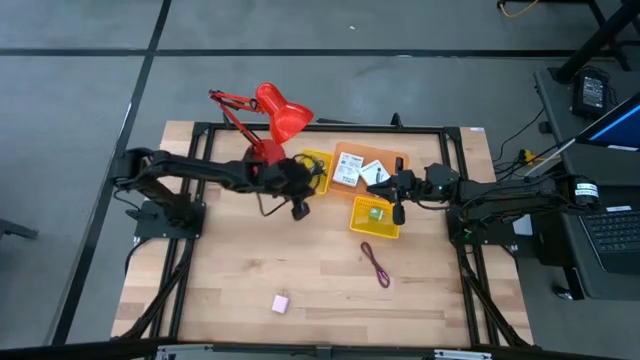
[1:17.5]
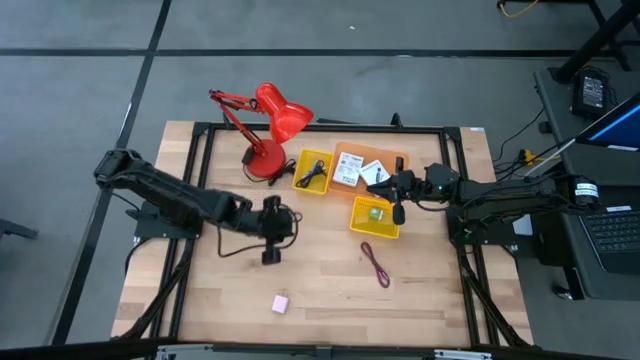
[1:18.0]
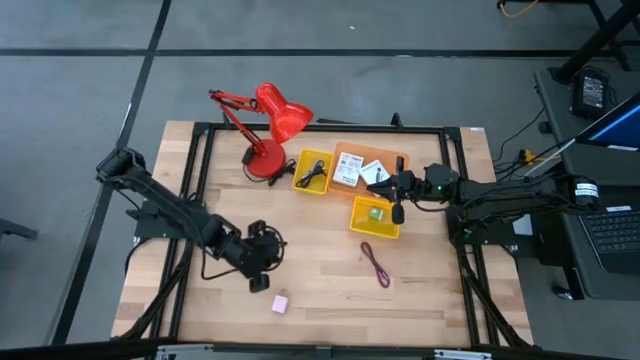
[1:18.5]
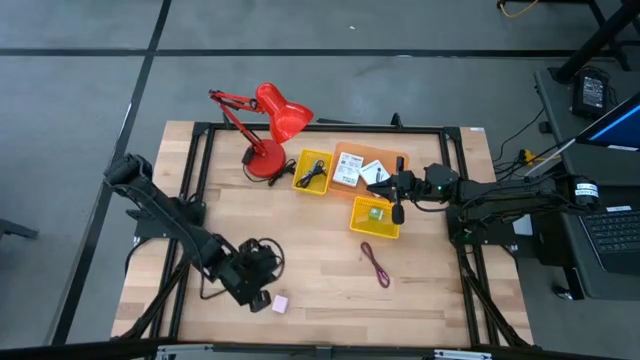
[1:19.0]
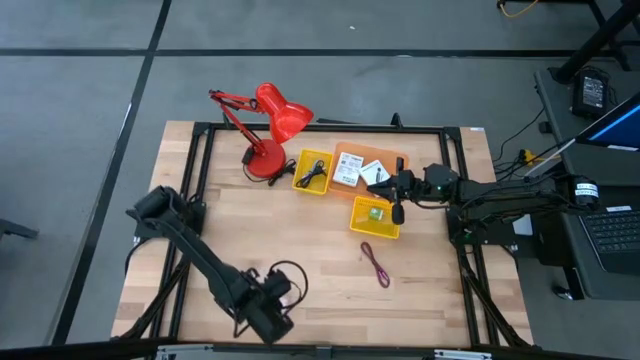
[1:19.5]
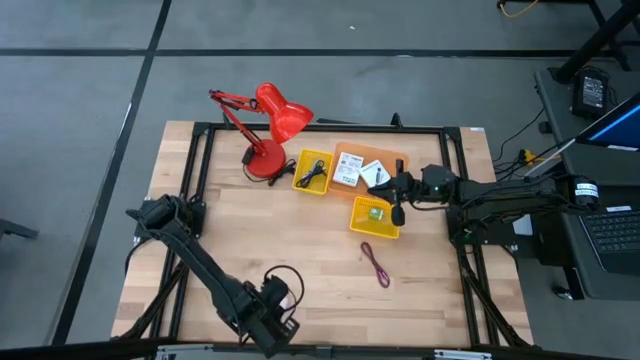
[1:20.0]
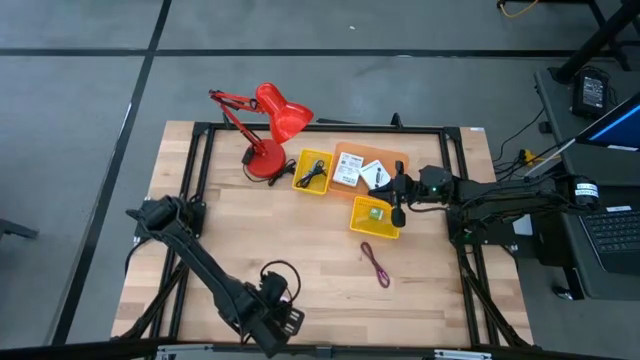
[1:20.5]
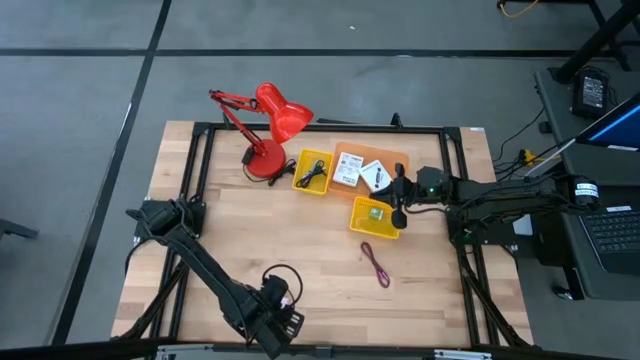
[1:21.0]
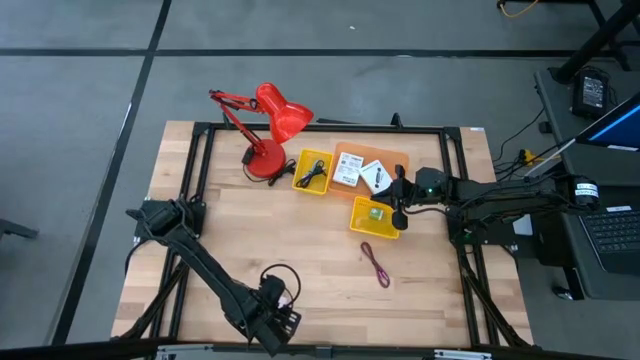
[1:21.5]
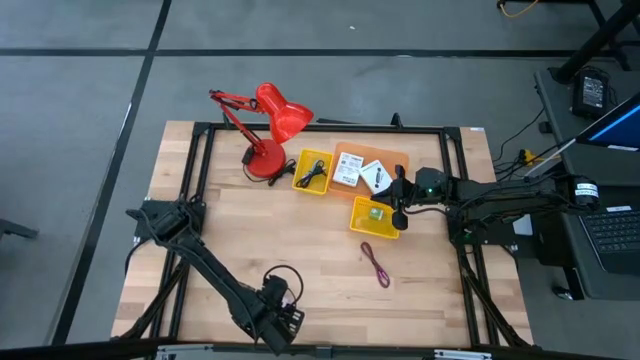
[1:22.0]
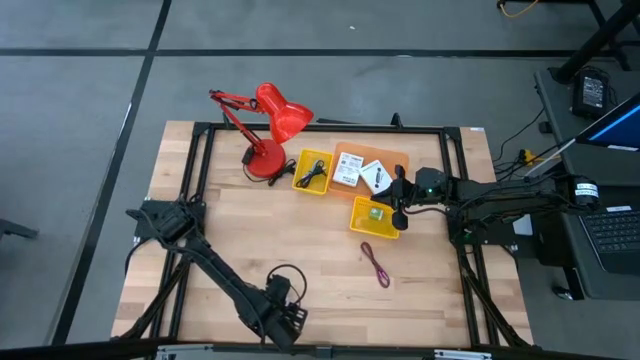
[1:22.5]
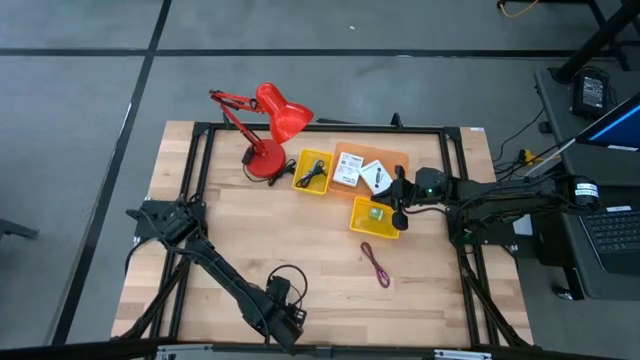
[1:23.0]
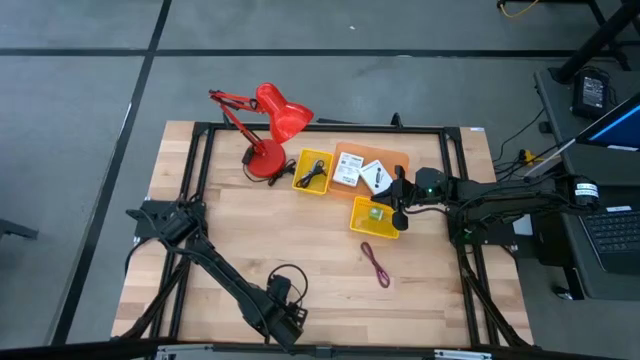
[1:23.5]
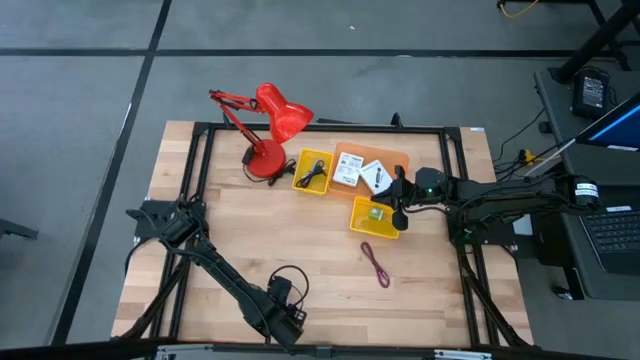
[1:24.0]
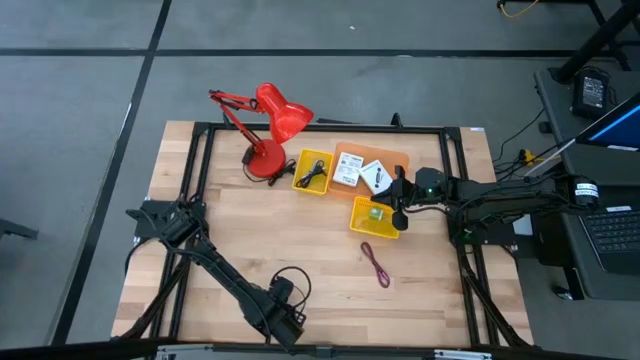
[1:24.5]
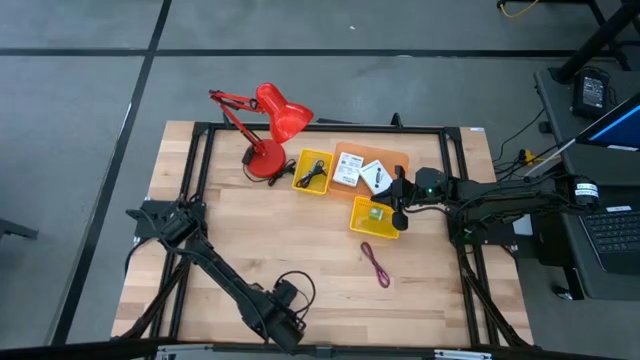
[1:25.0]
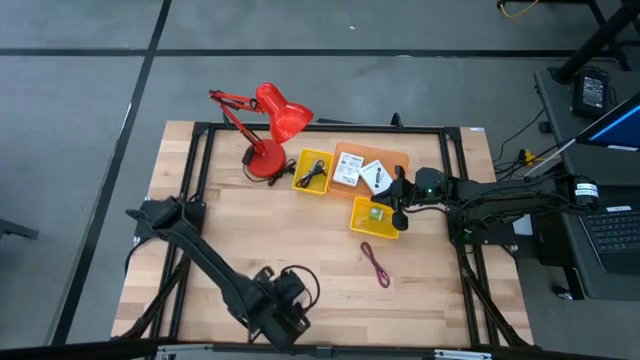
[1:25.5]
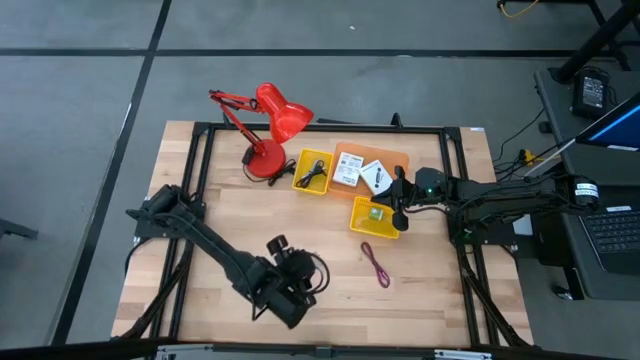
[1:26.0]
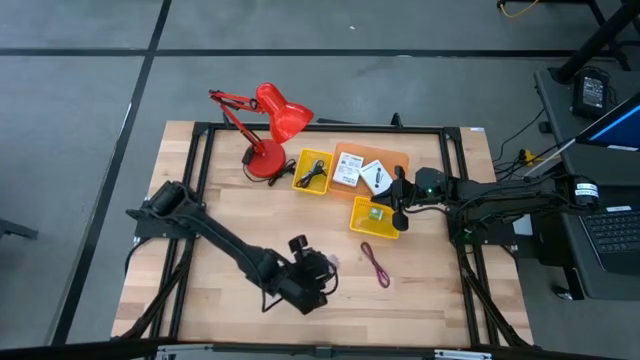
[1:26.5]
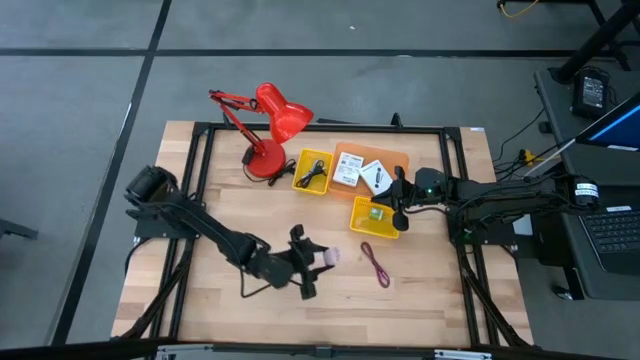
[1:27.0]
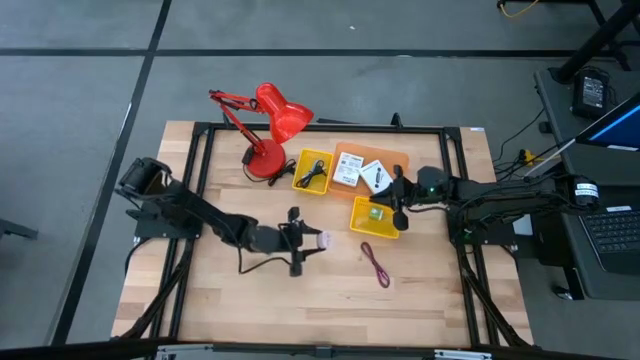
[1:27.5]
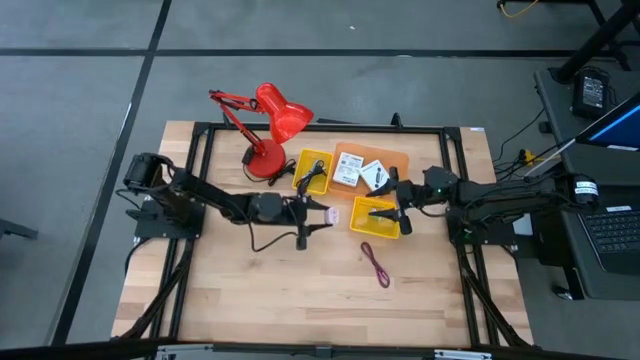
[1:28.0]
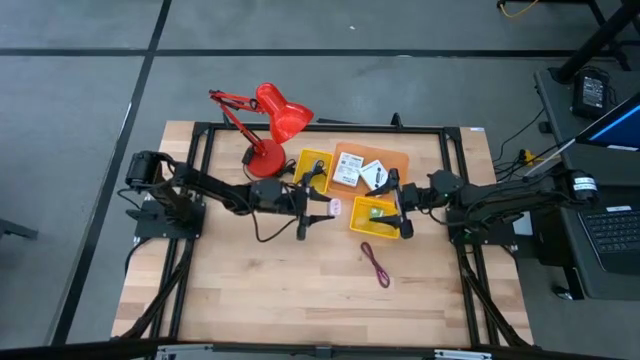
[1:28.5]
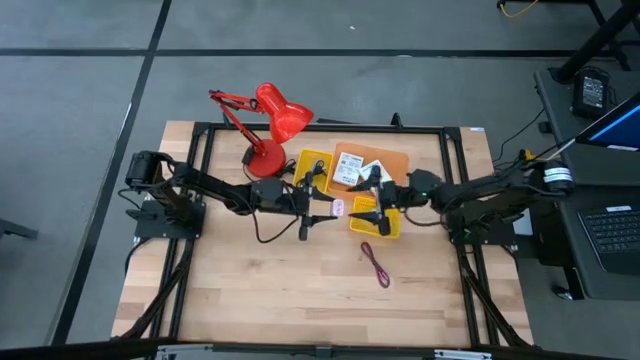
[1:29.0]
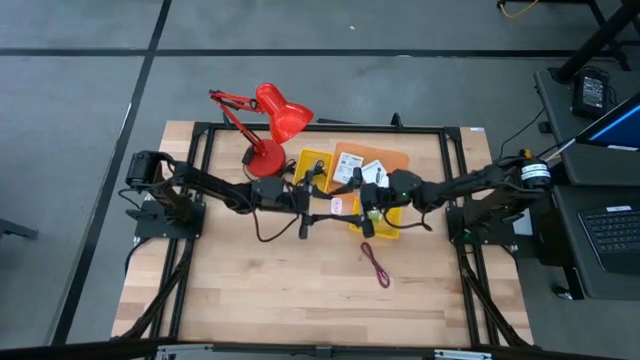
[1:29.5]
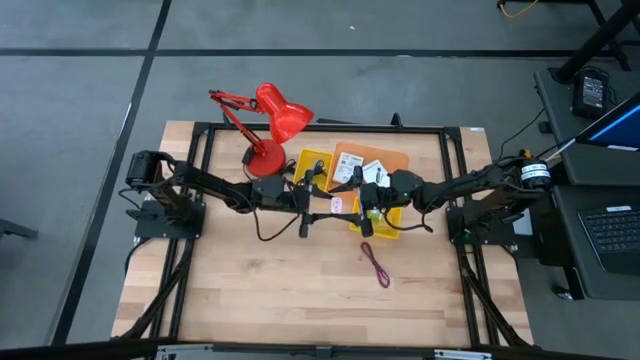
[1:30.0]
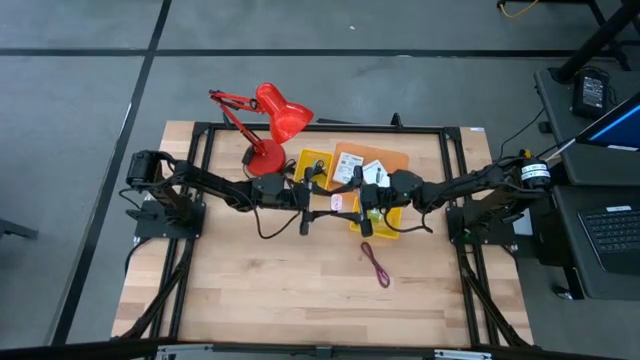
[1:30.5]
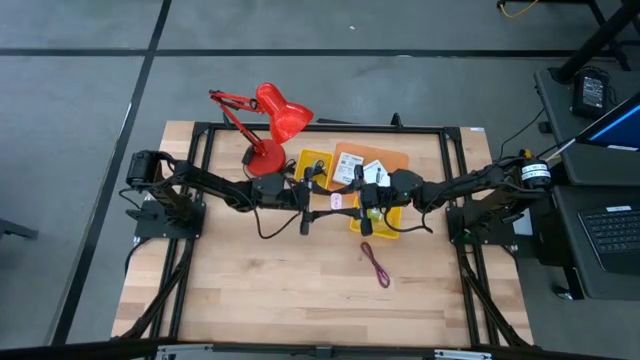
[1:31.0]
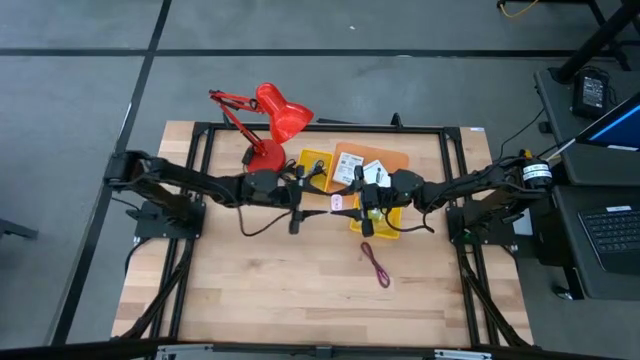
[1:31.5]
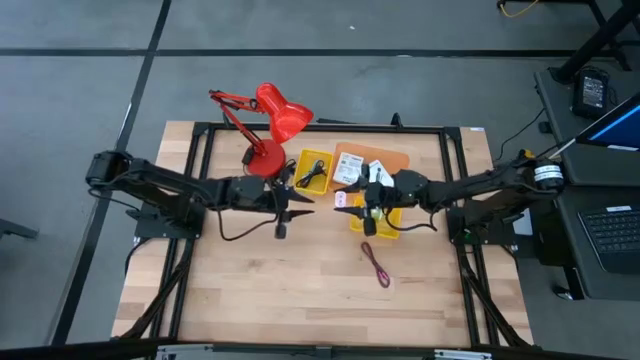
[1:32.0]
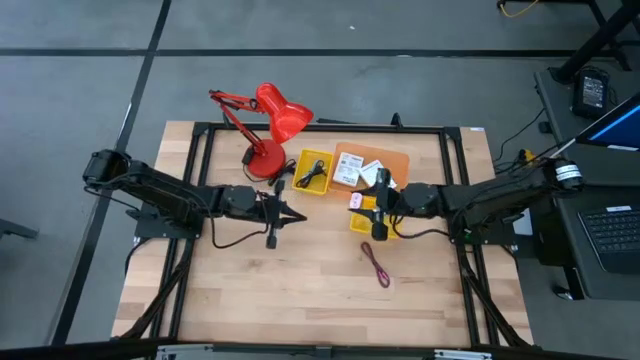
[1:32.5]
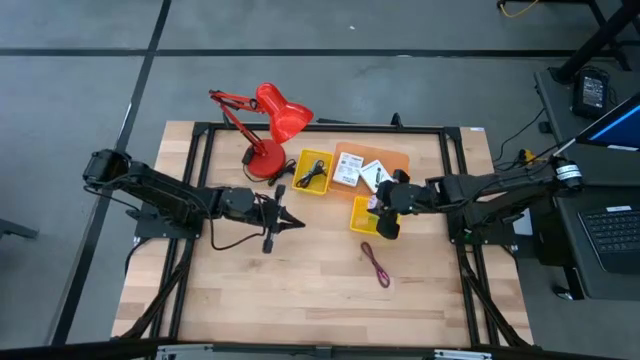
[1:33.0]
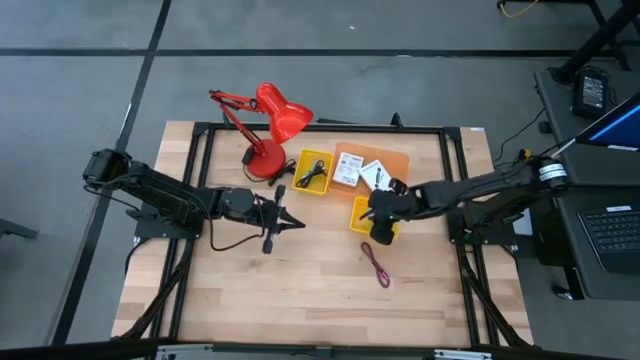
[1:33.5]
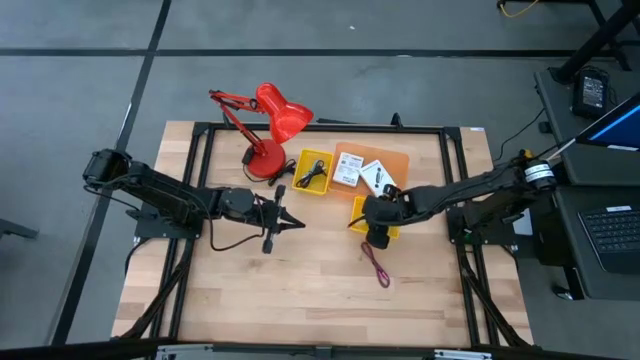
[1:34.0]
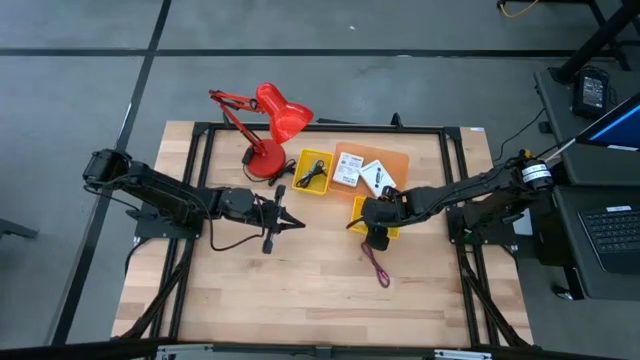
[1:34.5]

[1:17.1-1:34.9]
Task: Pick and place items into bin
Put the pink wall charger into the right yellow basket

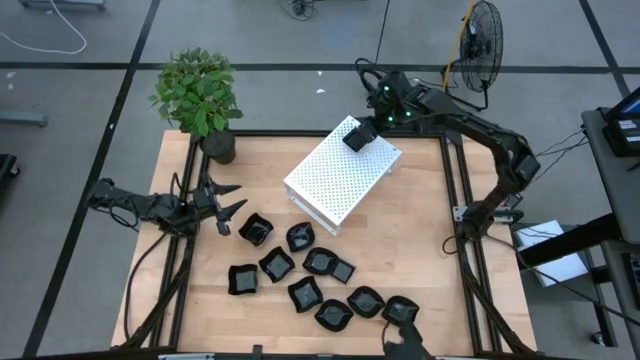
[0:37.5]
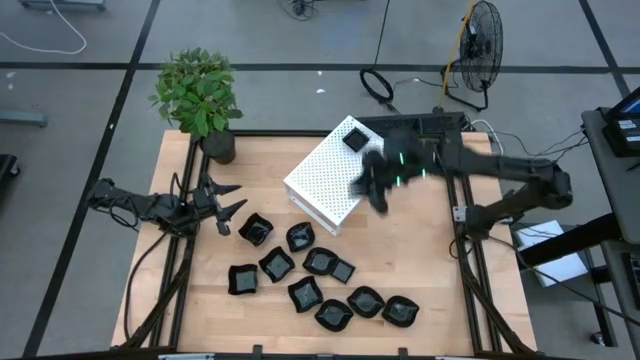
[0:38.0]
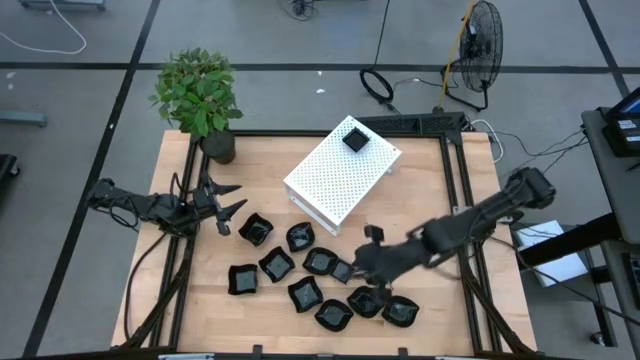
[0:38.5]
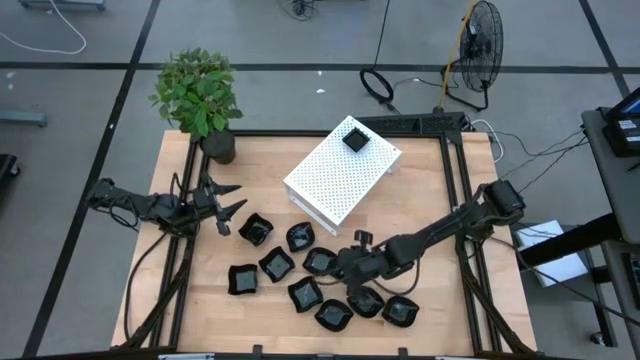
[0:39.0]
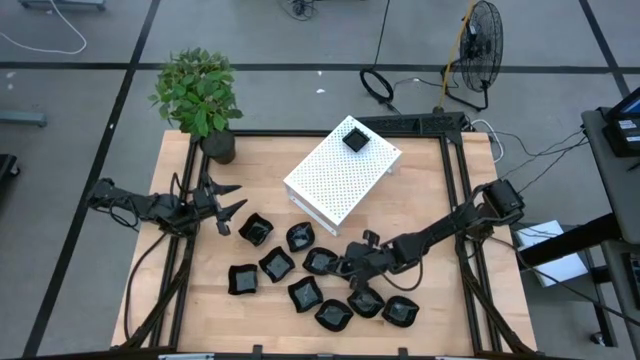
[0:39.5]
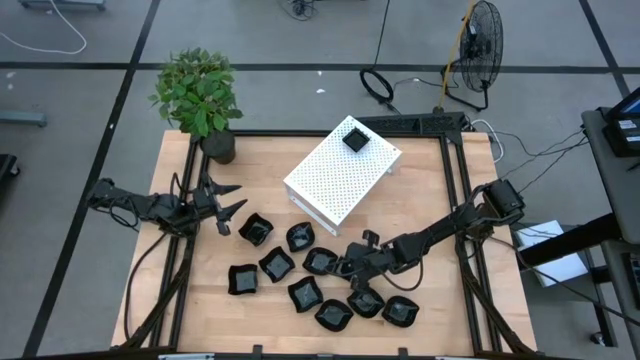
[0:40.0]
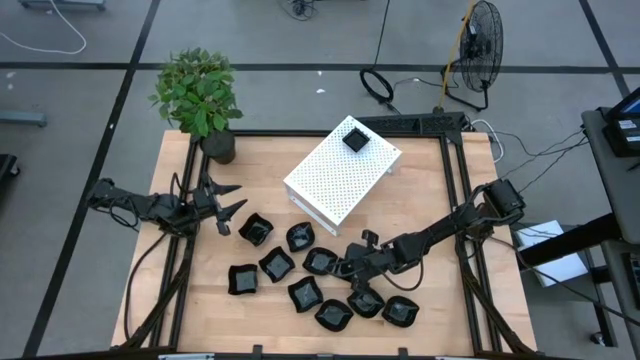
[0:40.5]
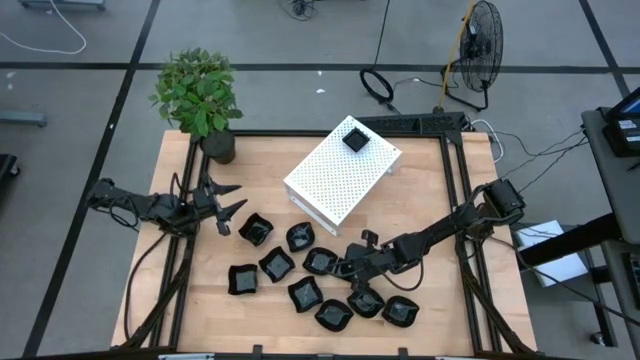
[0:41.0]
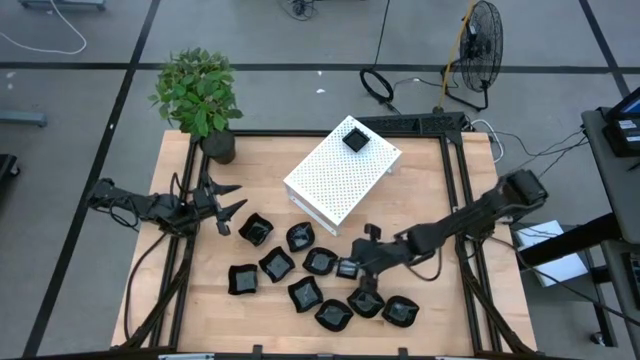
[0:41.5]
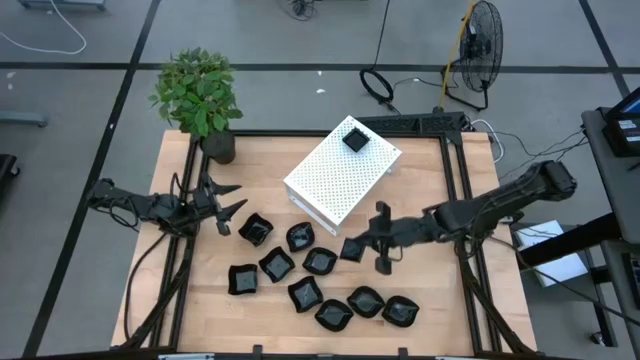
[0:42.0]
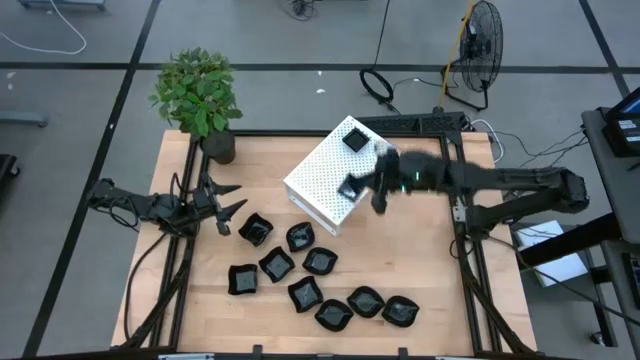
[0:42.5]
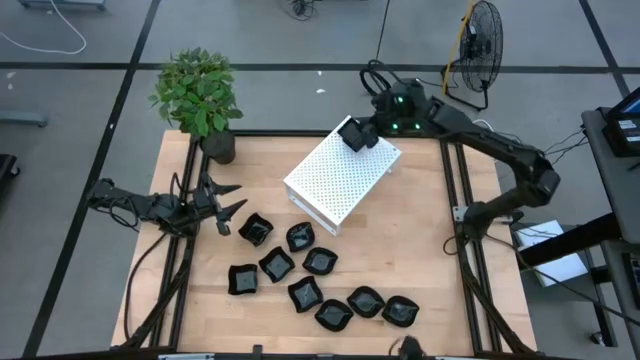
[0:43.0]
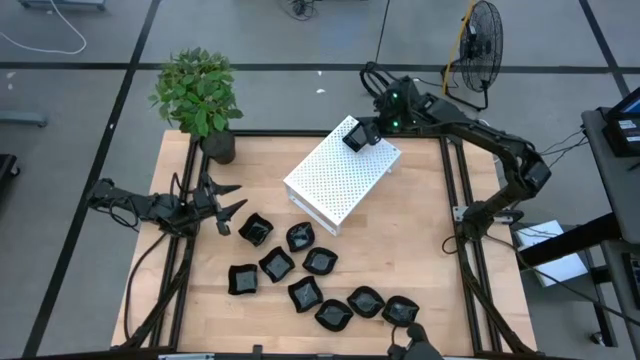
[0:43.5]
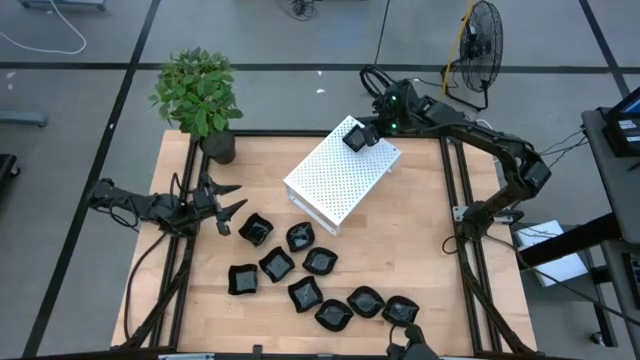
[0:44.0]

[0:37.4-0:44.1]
Task: Pick & Place Mini shaped plates
Stack the black square plate on top of the black square plate on the shelf
